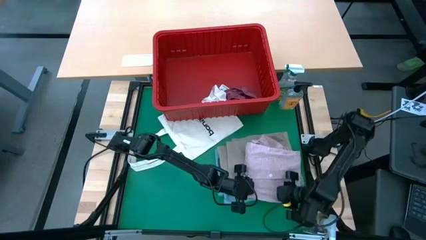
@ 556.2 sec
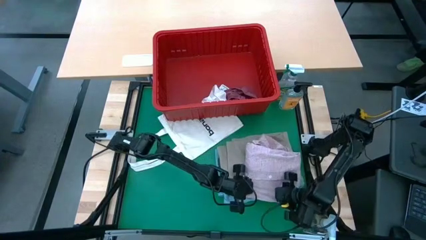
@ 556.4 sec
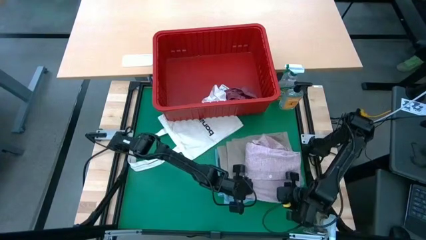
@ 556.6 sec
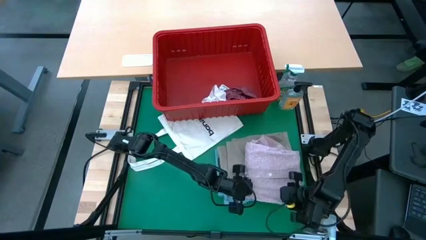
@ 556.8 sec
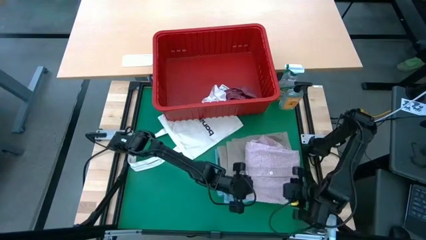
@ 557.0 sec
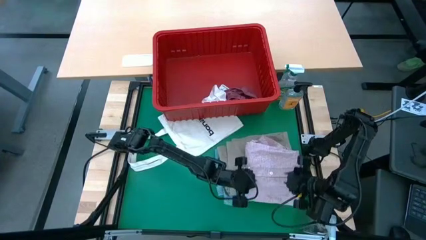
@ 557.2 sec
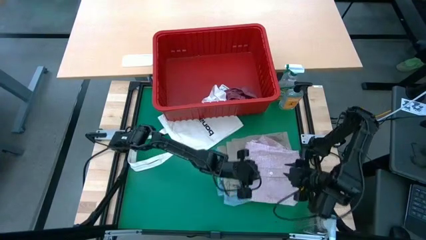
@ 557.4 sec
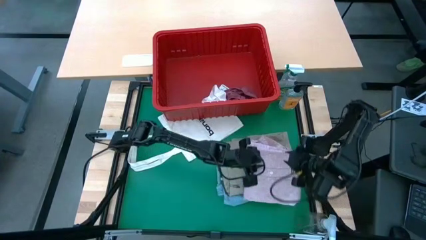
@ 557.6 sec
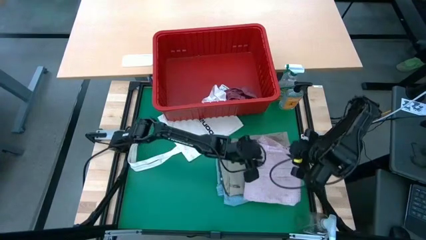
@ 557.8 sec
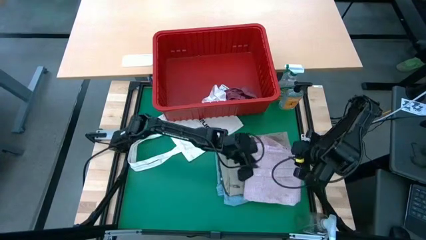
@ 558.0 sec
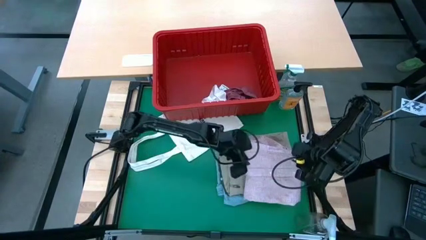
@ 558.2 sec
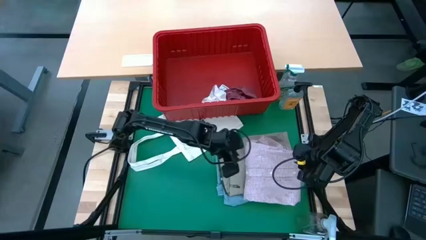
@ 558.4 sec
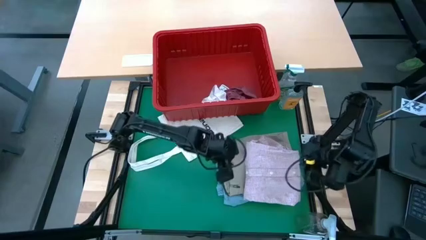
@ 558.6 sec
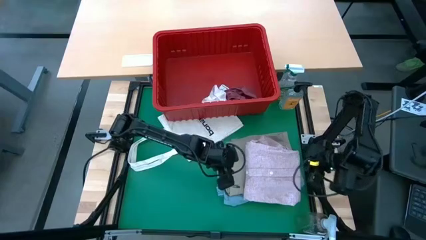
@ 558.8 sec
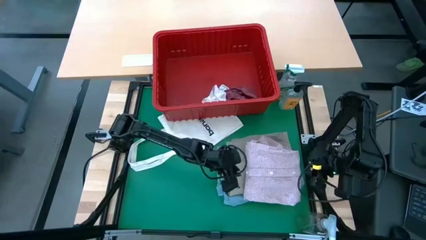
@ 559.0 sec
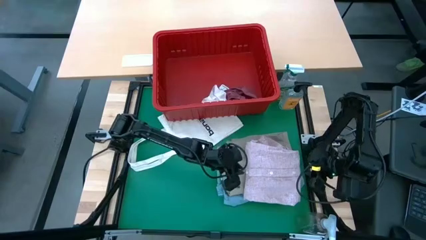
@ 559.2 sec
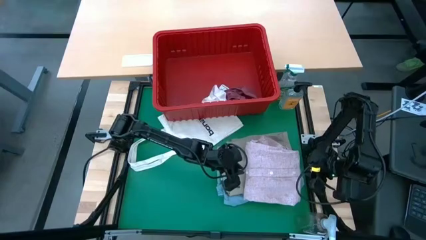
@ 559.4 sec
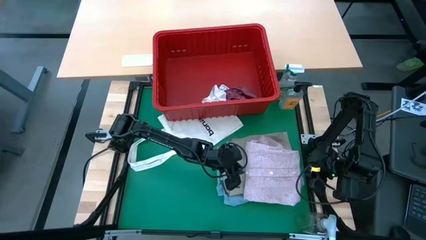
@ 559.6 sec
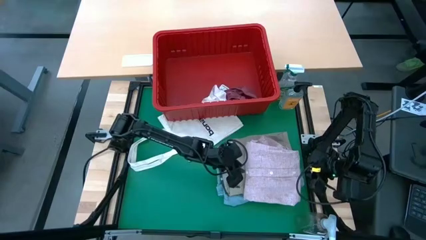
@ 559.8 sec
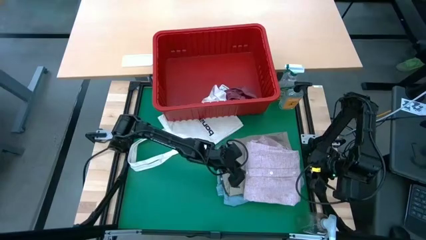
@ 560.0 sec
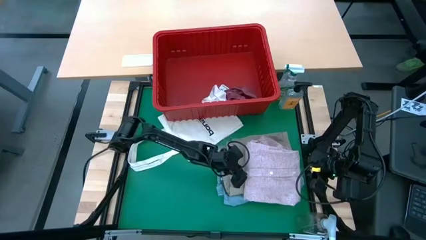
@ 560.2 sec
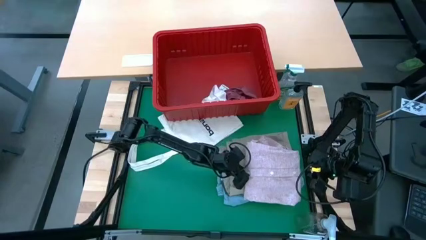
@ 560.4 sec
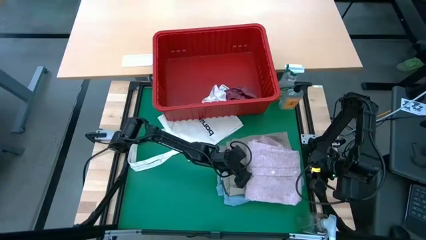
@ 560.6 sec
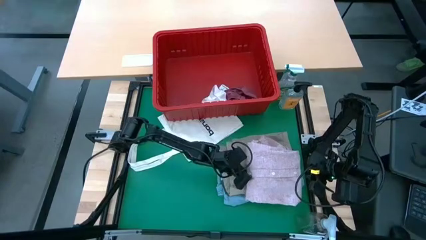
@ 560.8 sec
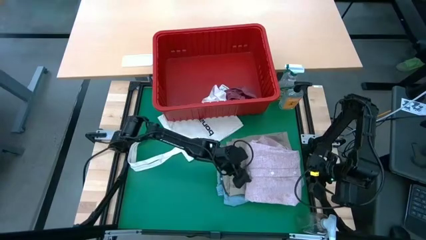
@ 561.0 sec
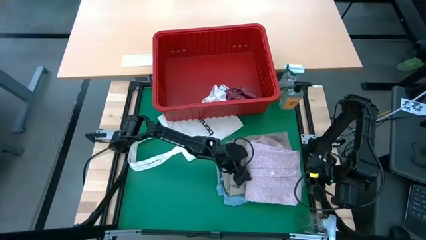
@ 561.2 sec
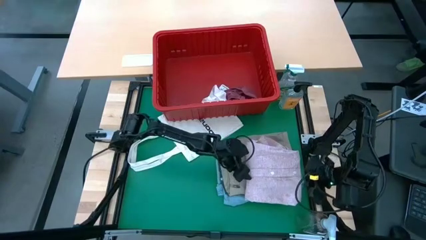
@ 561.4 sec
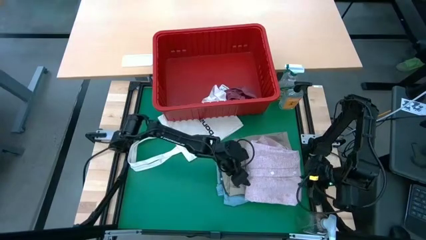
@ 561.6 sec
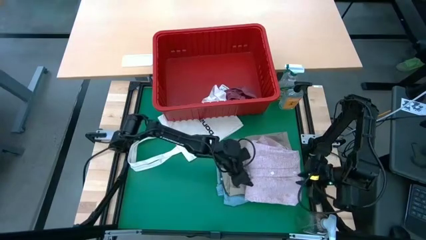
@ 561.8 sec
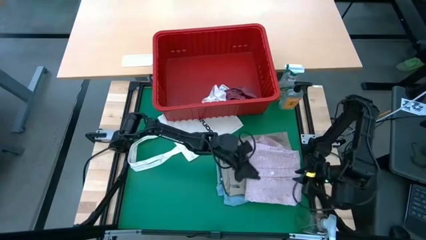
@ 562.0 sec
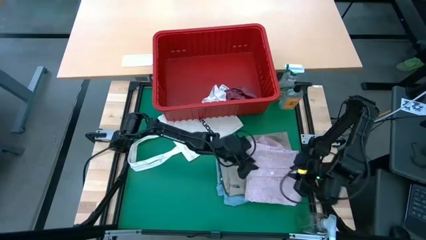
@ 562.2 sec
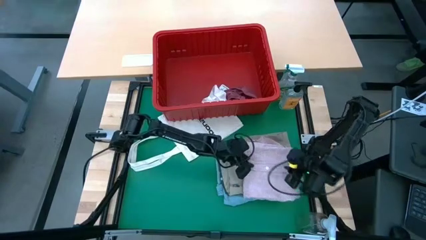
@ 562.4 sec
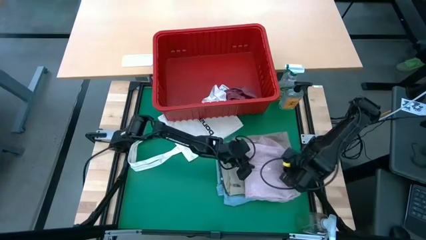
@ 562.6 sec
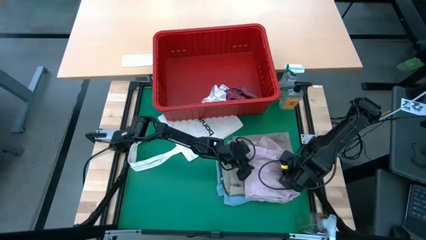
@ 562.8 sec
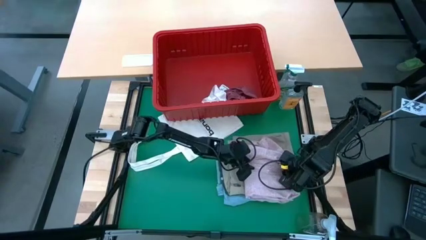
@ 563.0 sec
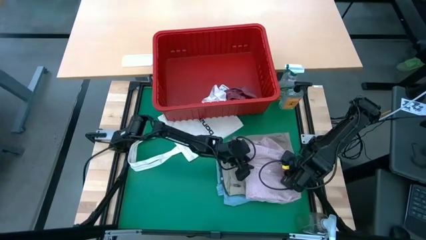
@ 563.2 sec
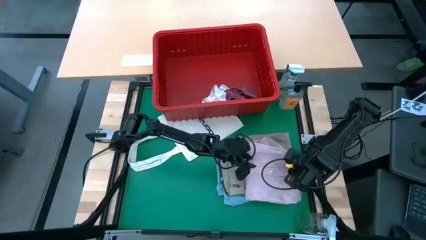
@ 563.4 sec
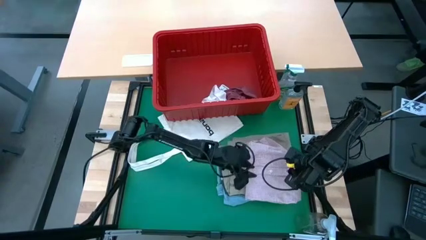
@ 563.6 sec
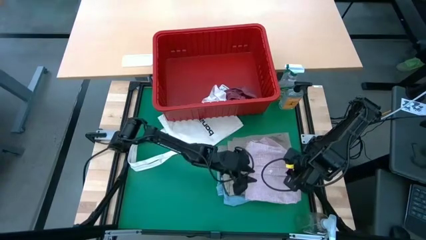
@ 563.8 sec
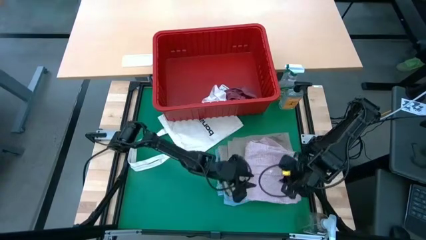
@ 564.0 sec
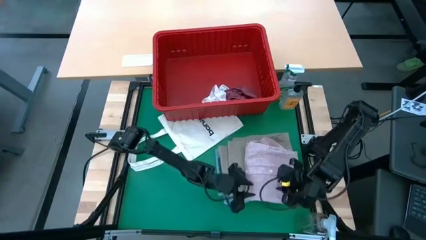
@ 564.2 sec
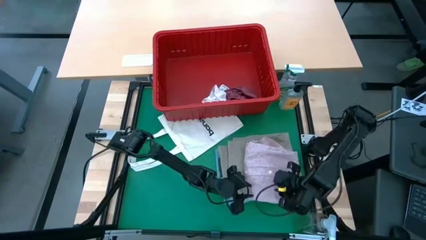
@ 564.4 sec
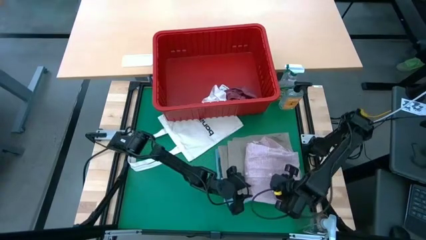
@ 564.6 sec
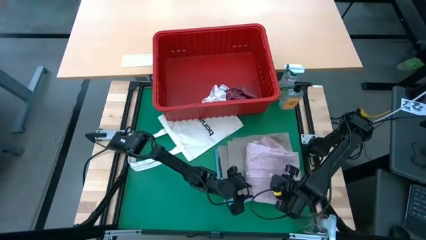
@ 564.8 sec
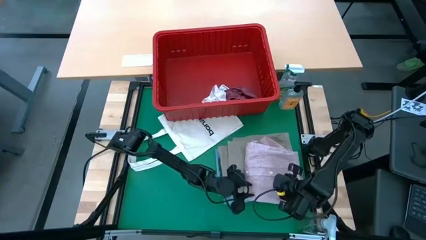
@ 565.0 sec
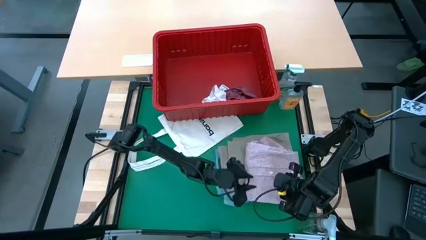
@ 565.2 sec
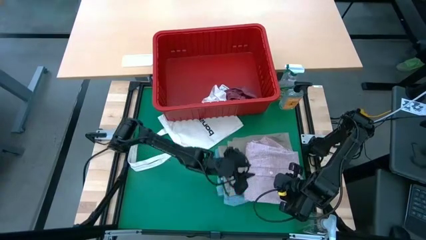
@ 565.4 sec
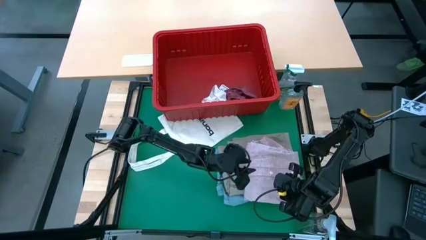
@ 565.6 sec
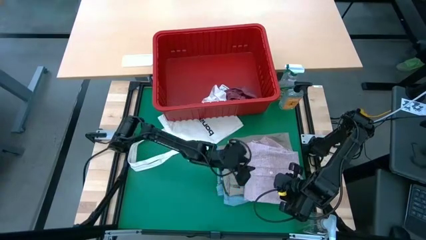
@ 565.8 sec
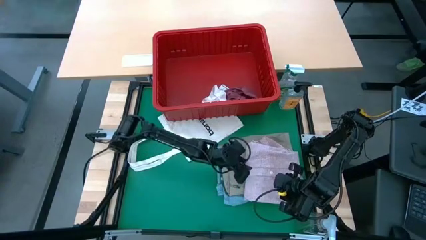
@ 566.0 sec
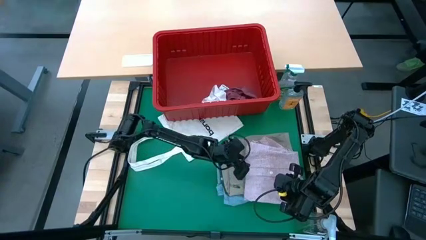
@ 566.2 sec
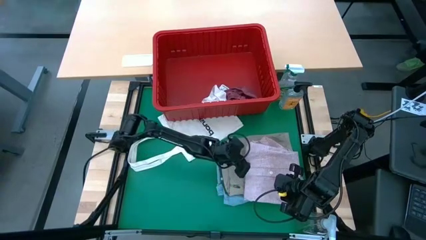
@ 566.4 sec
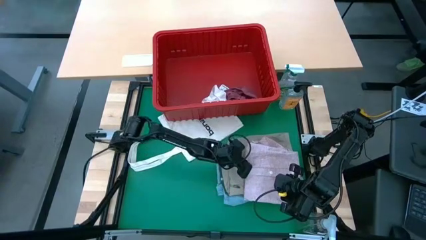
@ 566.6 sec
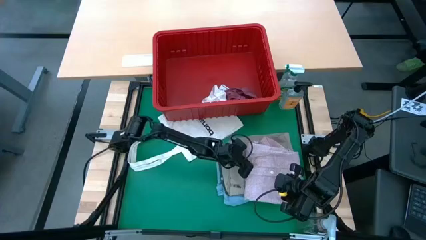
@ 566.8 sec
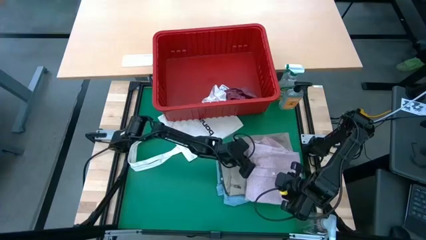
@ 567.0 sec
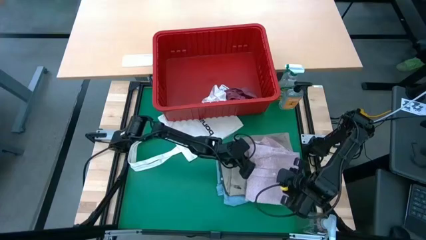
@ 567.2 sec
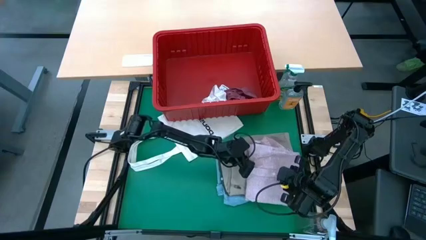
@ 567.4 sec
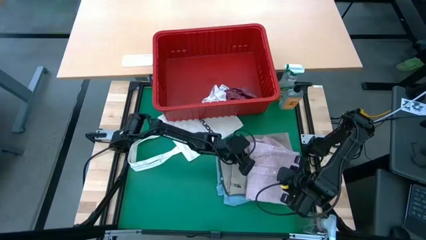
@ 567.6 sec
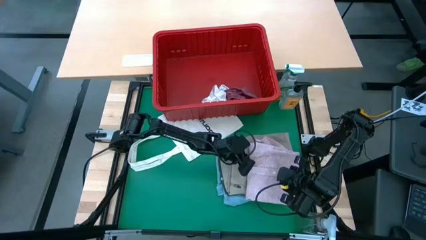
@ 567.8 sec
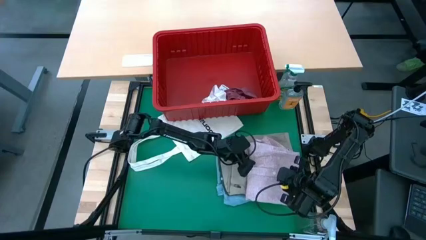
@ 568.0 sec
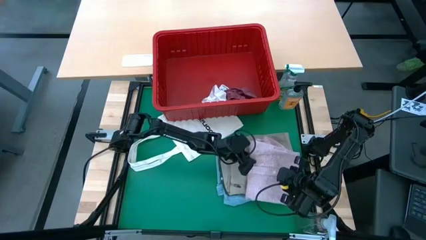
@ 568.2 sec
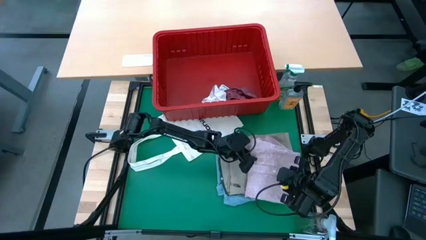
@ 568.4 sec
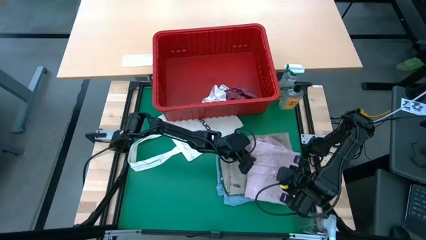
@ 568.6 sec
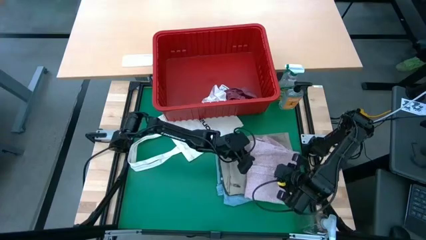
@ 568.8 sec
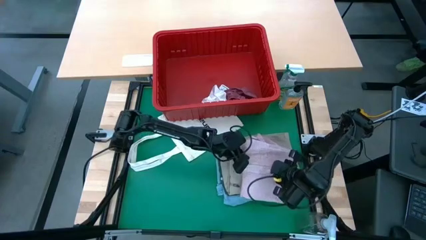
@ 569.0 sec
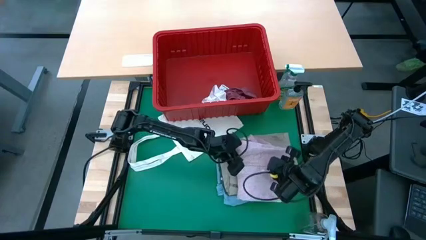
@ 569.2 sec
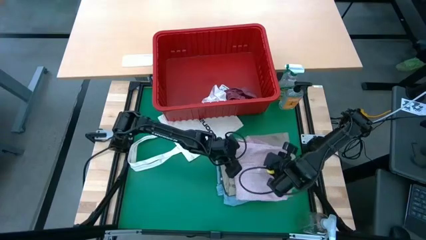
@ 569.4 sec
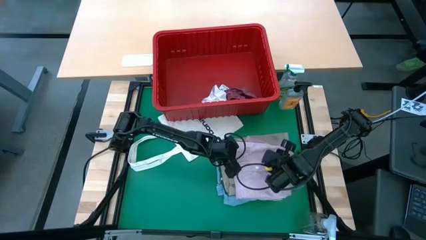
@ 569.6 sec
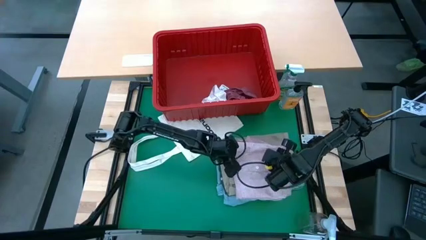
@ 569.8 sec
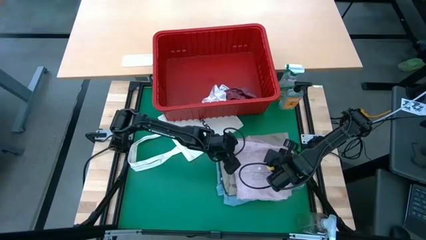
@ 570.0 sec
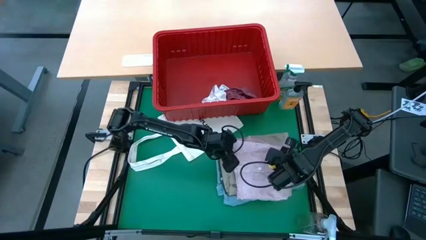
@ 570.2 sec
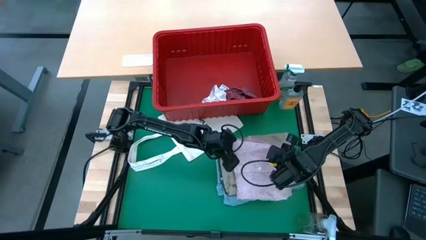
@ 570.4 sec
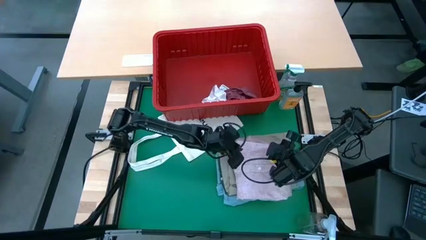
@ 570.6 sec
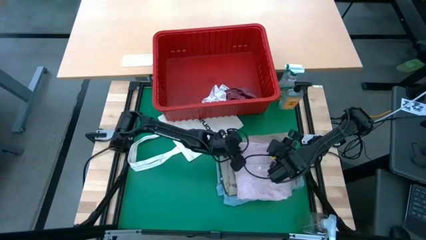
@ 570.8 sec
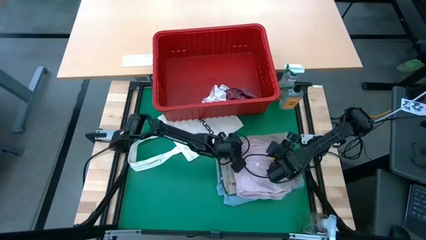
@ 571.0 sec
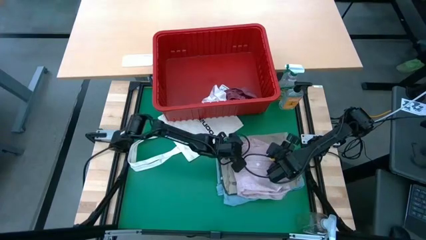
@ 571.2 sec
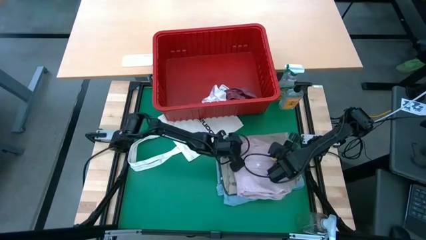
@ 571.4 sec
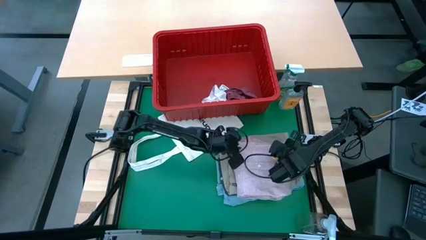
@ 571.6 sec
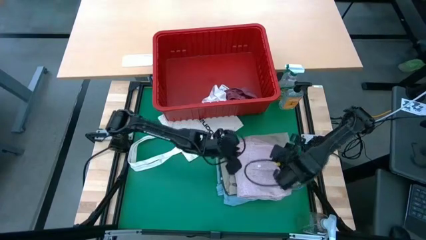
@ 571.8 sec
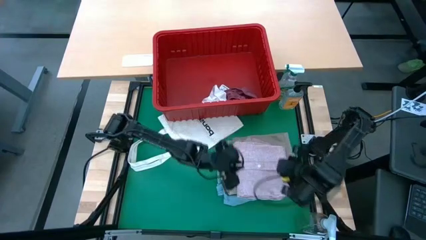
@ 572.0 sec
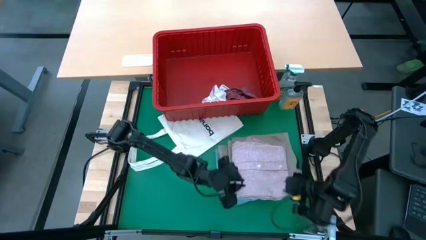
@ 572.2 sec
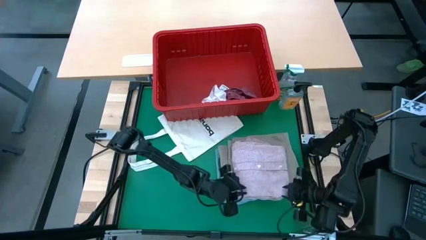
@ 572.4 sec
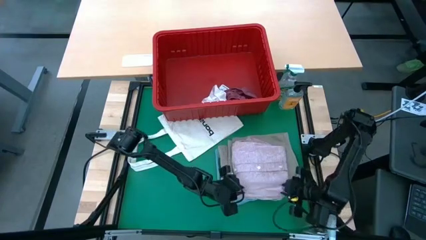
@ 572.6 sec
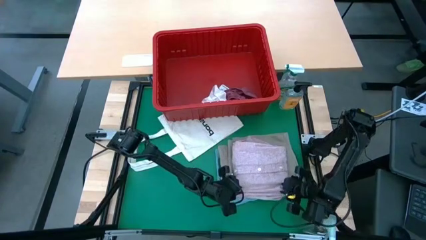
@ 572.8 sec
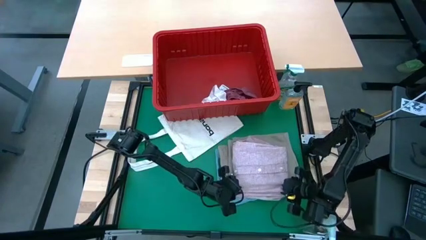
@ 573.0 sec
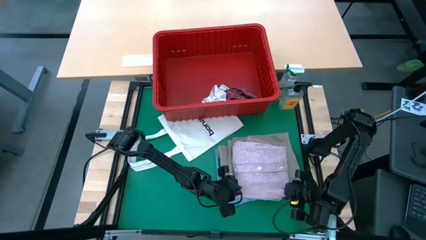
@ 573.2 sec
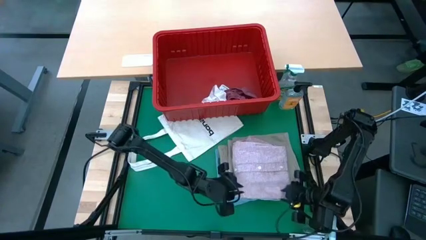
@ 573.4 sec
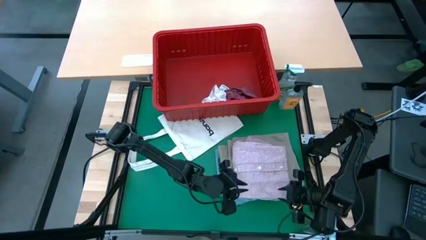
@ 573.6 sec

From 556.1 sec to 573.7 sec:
Task: Fold laundry
Fold the pink shirt
